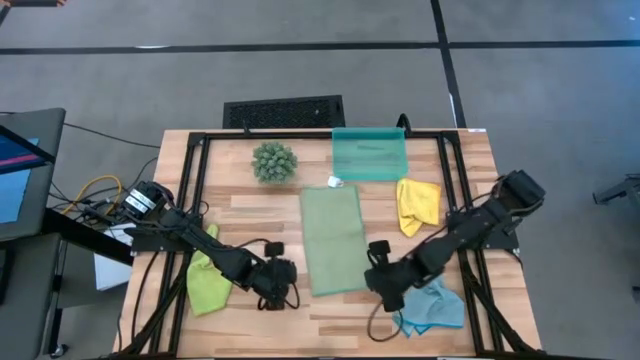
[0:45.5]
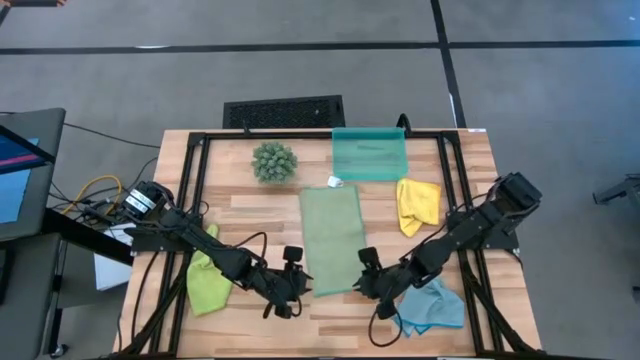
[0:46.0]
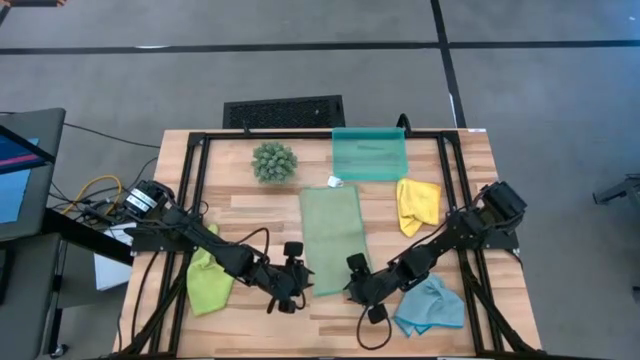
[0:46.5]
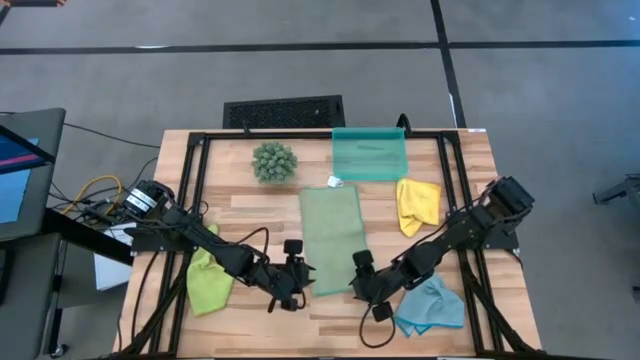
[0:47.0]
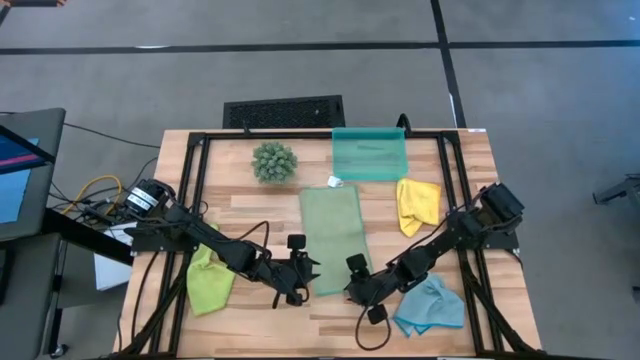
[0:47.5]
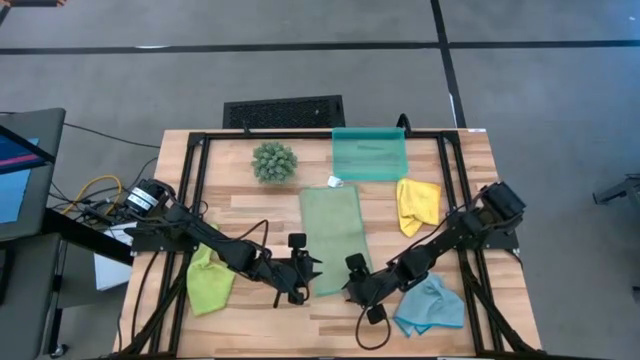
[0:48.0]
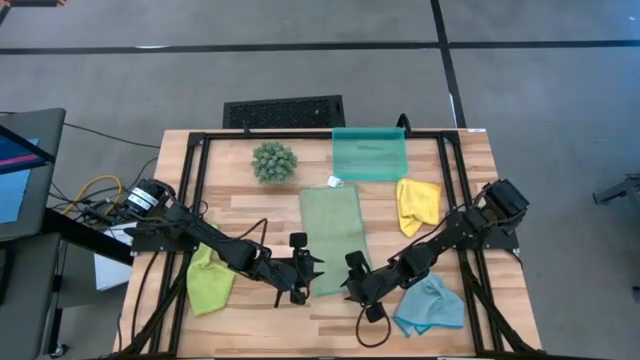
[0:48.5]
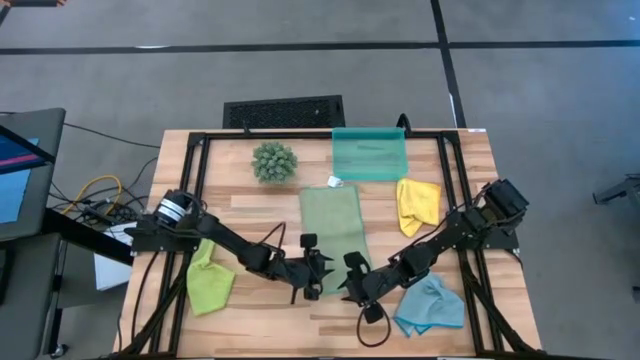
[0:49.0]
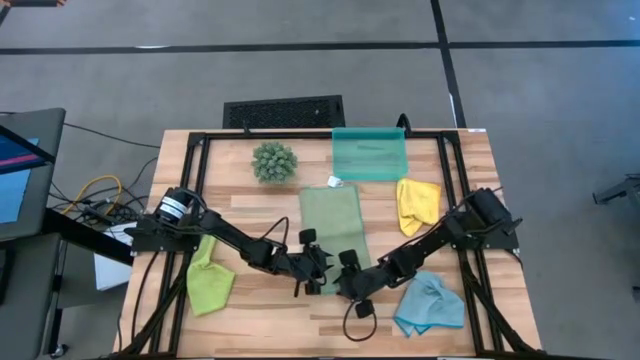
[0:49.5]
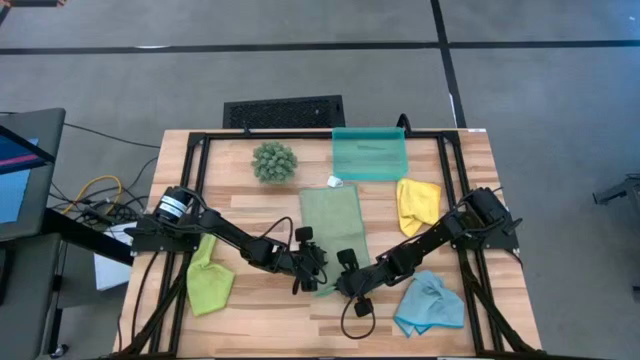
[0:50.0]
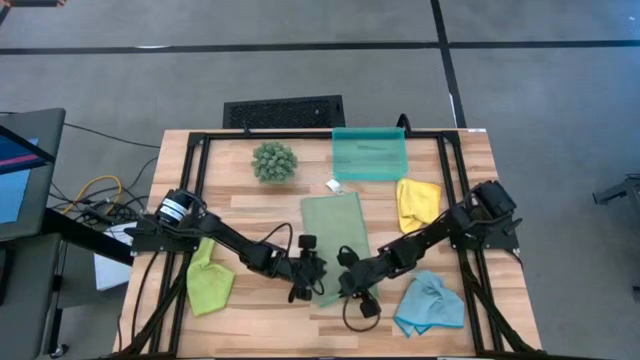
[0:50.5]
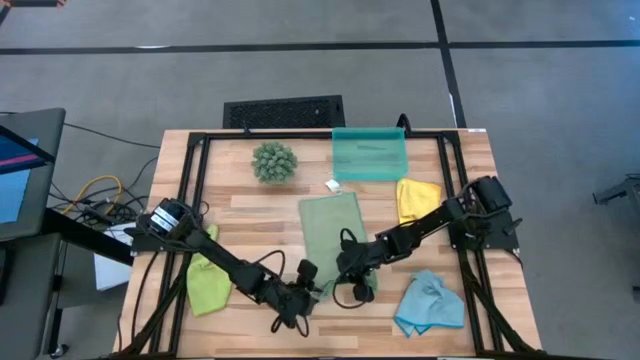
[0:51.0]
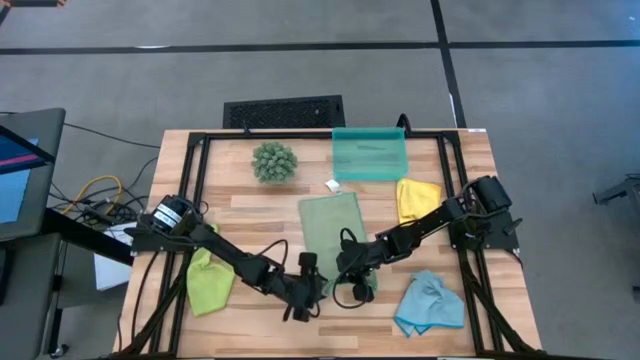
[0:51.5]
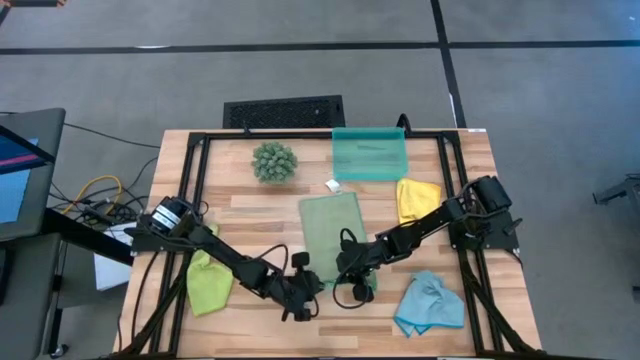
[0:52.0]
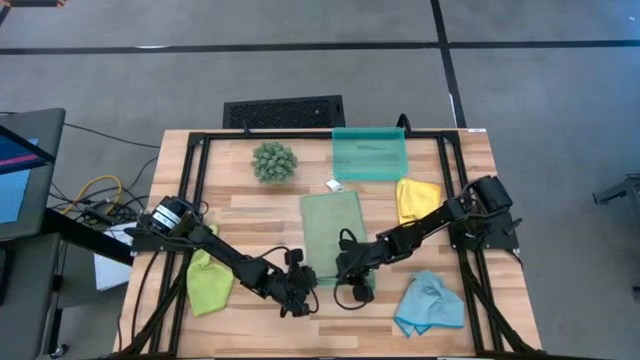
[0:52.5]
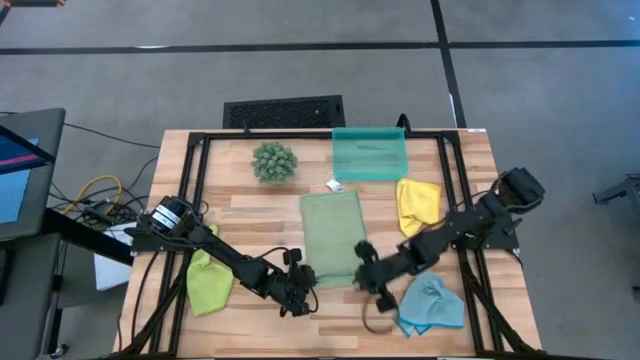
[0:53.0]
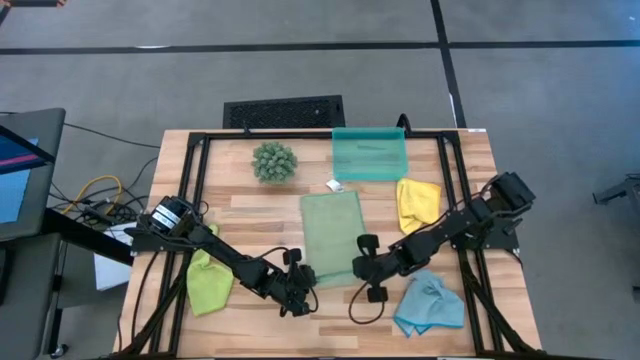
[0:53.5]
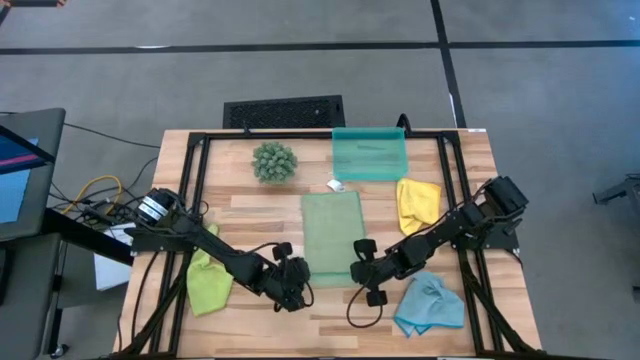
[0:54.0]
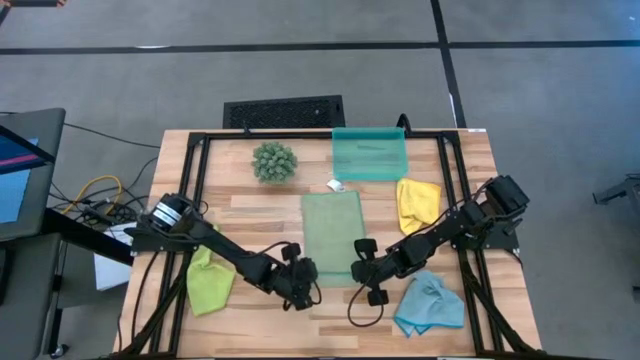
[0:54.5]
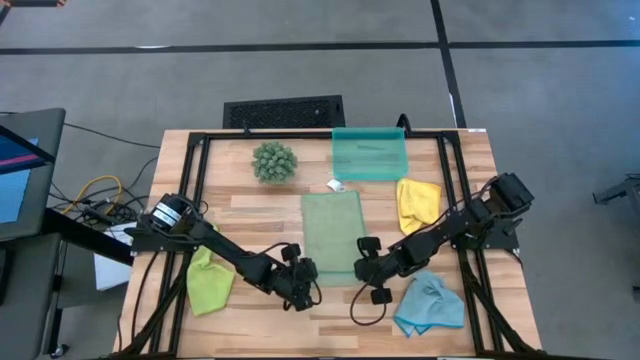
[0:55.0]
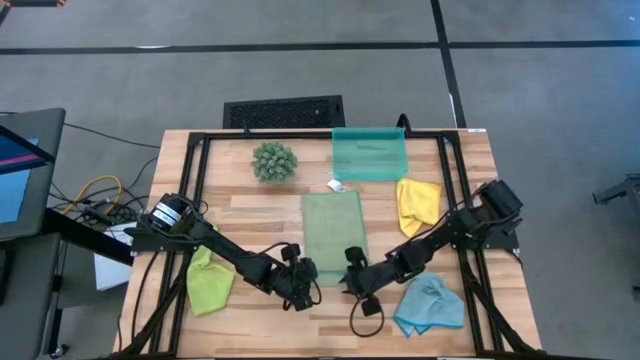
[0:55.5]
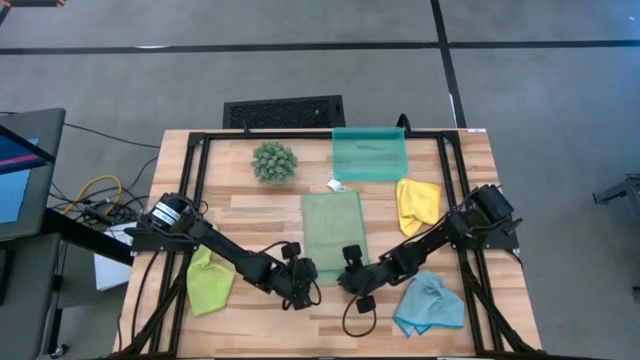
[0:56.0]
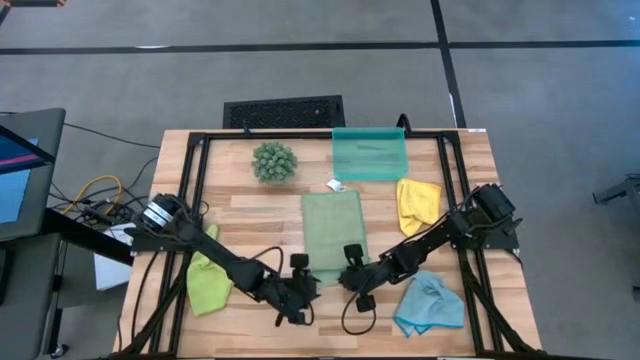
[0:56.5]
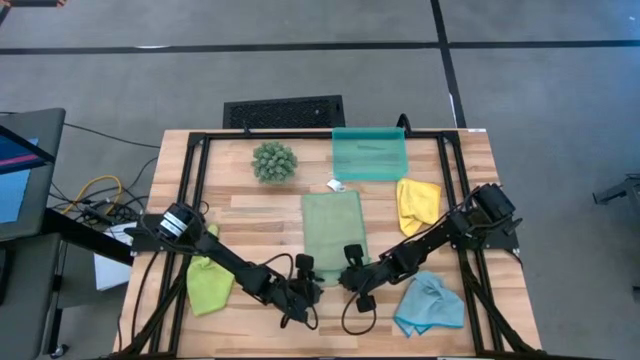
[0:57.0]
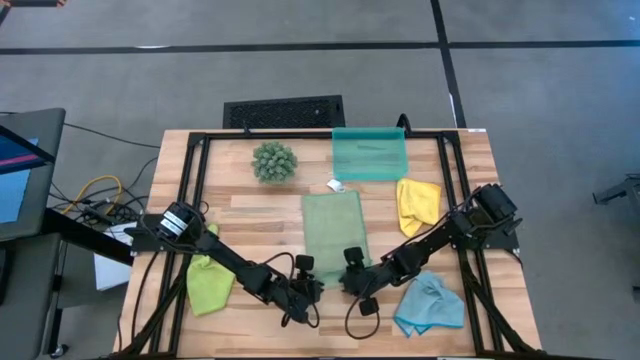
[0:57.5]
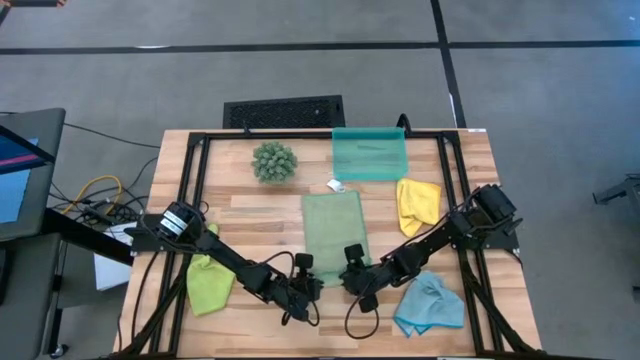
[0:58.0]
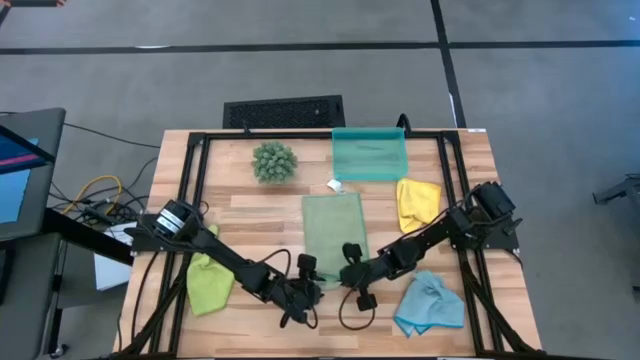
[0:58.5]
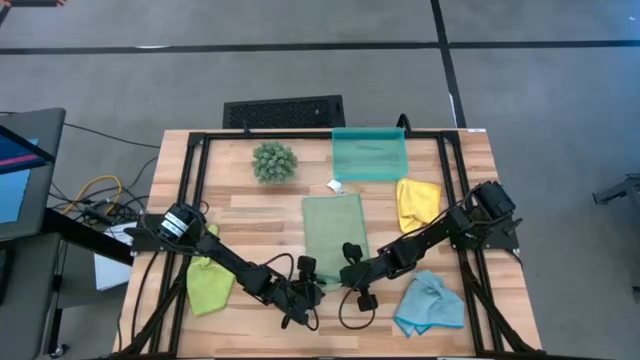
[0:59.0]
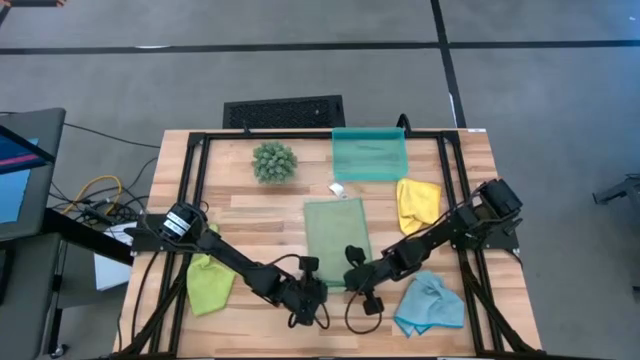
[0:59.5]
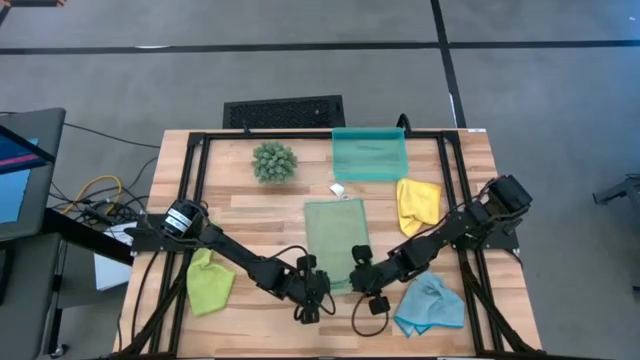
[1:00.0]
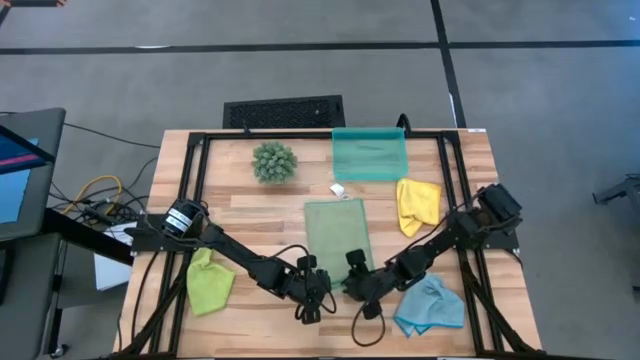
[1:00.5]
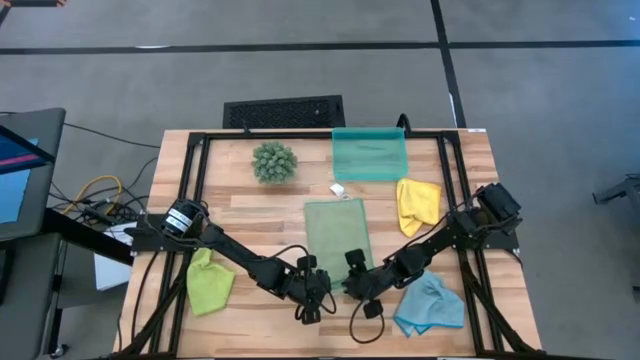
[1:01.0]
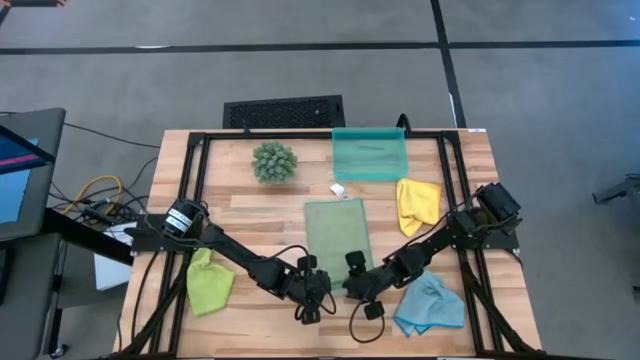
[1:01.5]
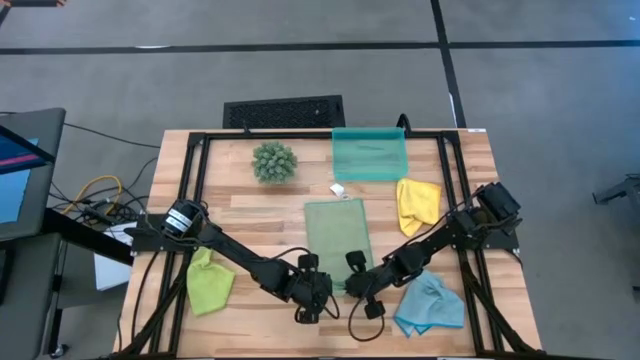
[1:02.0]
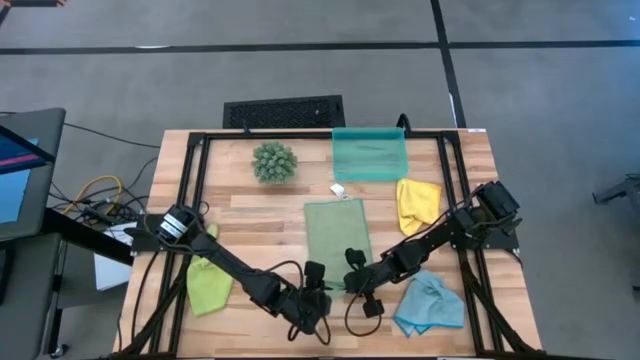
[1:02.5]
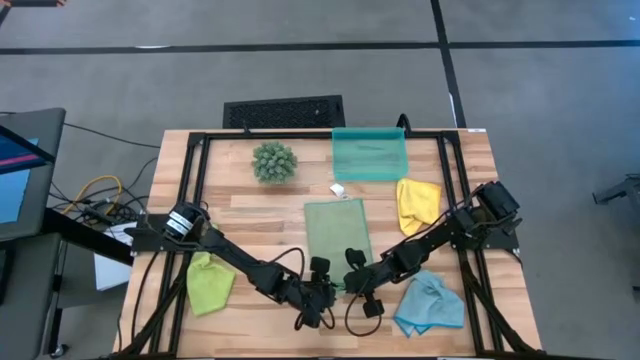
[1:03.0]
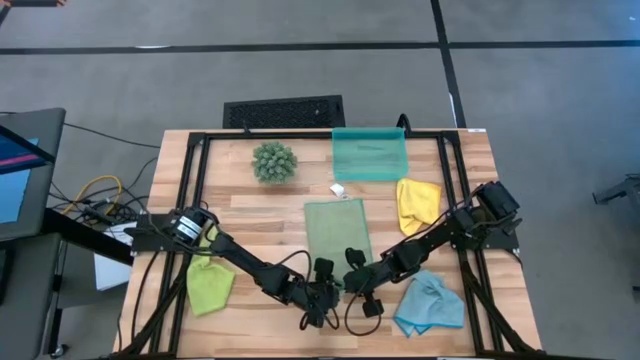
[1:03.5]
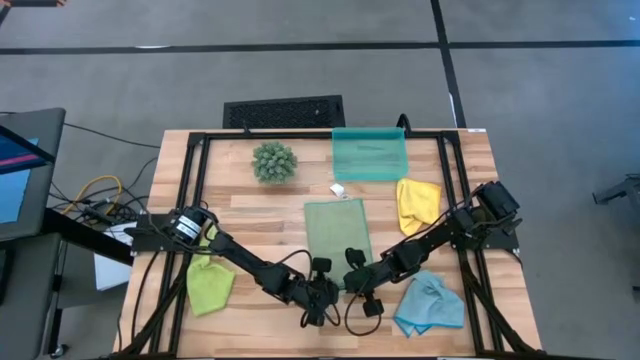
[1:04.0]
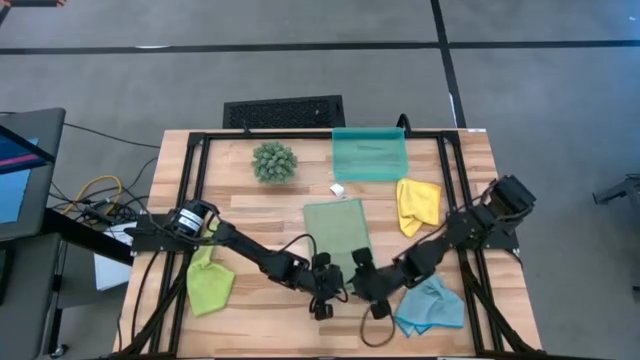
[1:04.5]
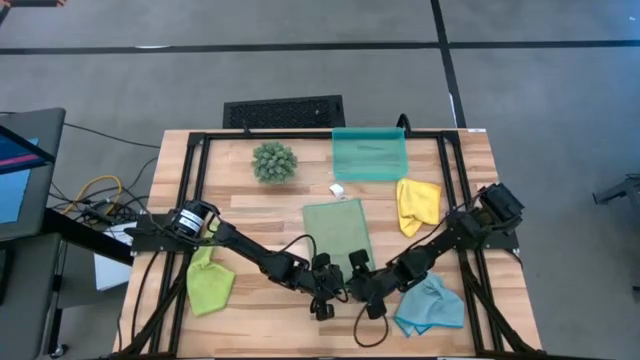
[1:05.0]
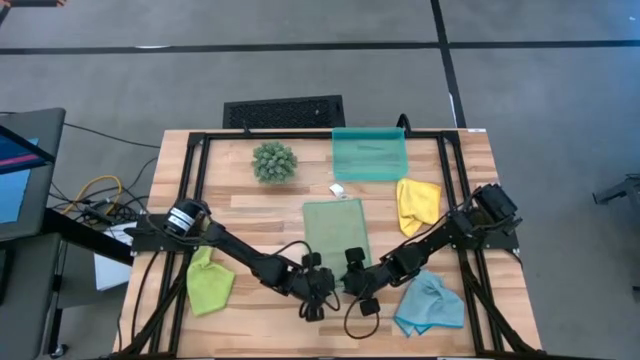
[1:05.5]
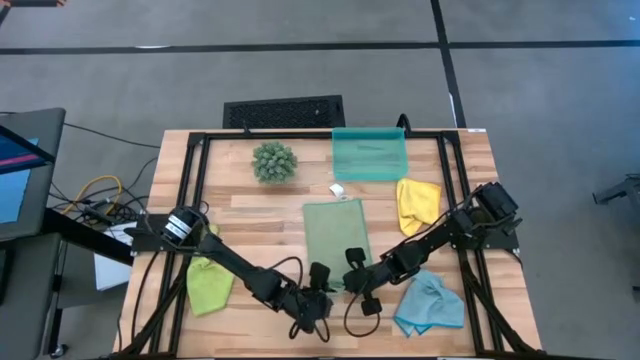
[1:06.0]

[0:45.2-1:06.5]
Task: Roll microfiber towels into tight, uniform cylinder then place into a basket
Roll the dark green microfiber cloth
